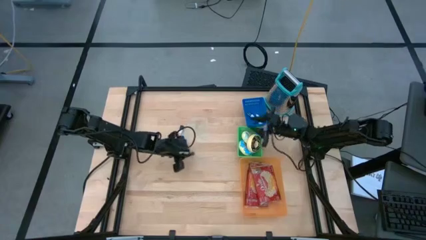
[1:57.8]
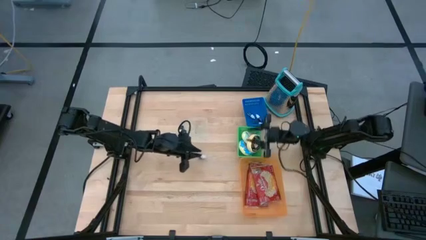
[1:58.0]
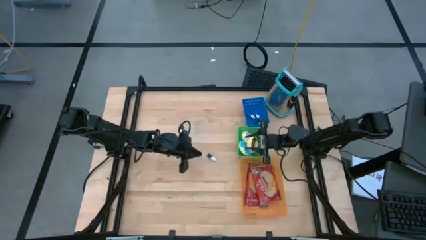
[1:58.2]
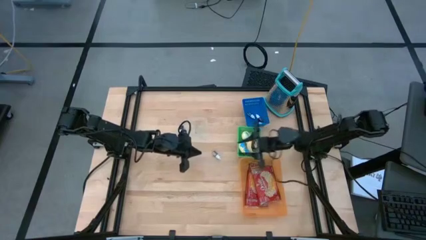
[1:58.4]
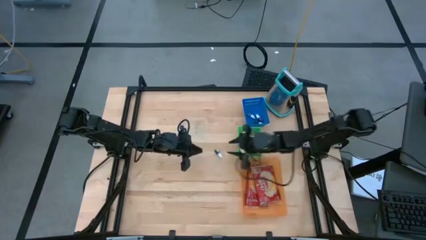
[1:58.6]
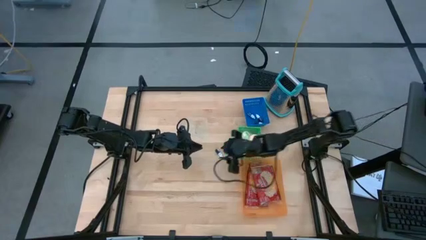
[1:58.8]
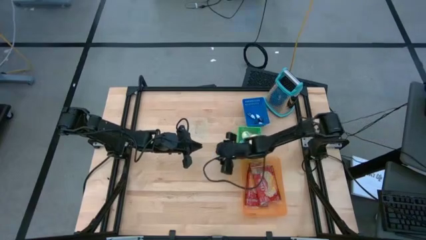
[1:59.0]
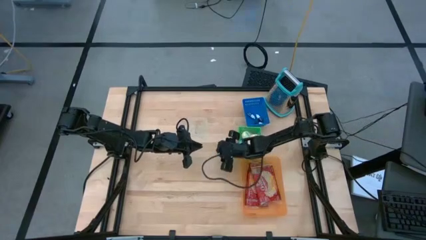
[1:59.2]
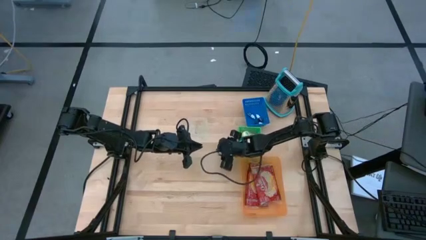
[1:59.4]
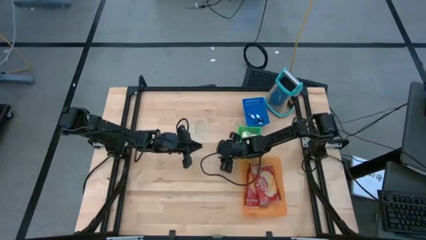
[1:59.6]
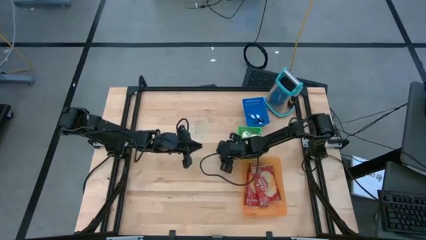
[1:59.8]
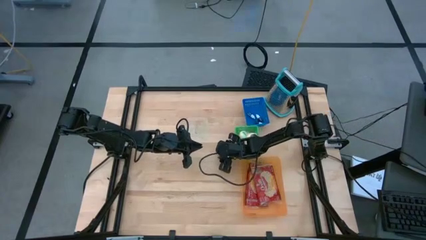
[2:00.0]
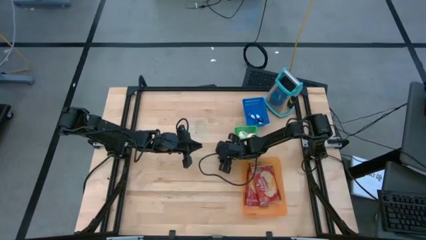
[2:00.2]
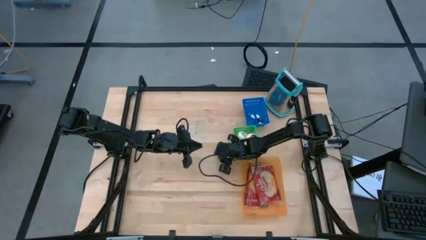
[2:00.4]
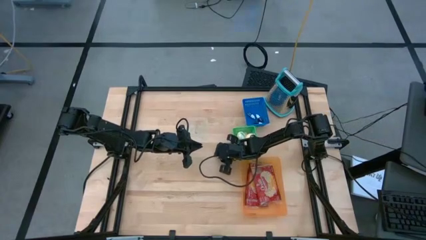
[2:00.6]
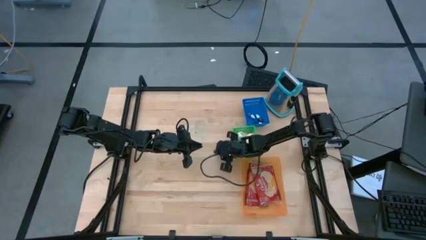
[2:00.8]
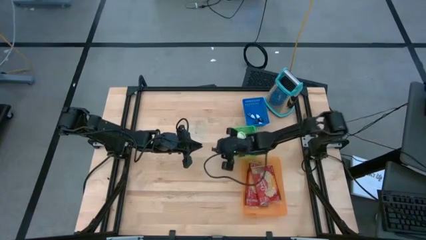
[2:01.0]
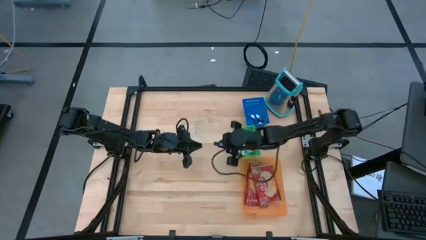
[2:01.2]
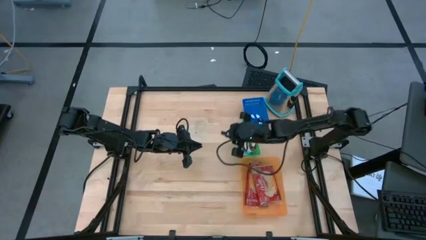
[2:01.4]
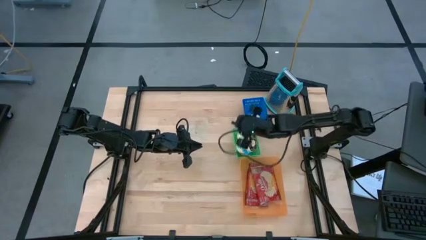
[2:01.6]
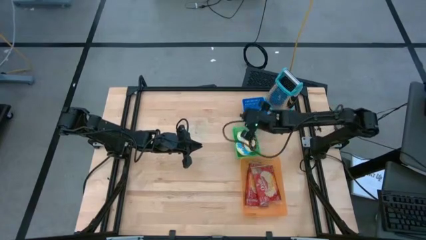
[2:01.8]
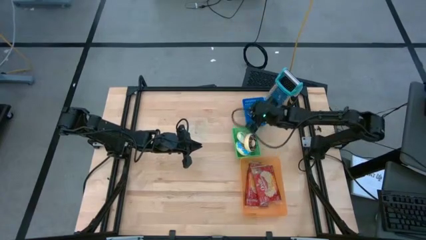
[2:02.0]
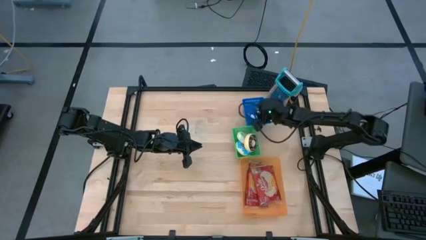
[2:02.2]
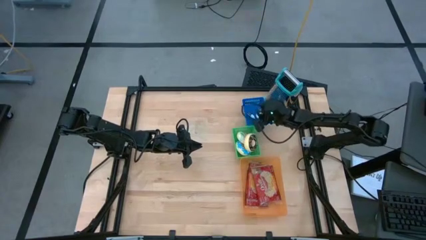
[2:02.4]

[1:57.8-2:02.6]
Put the brown food coloring bottle into the blue bin

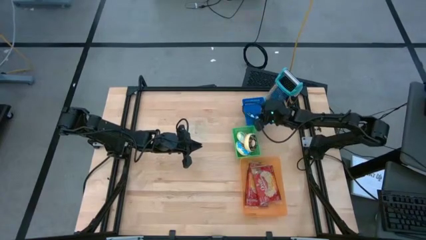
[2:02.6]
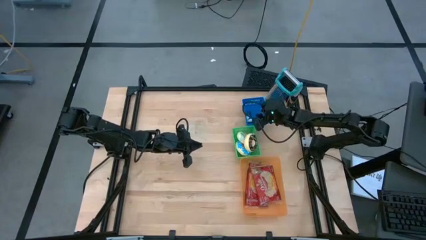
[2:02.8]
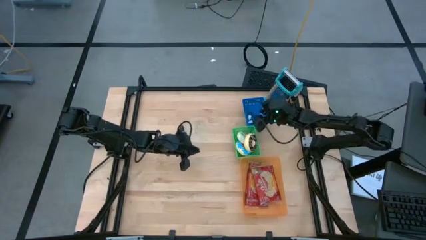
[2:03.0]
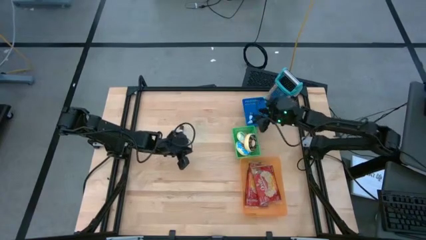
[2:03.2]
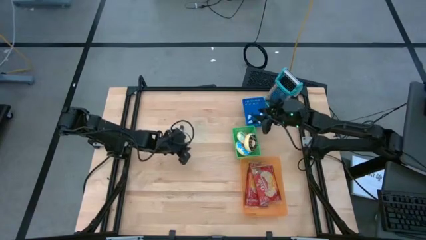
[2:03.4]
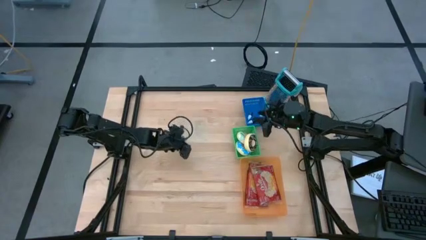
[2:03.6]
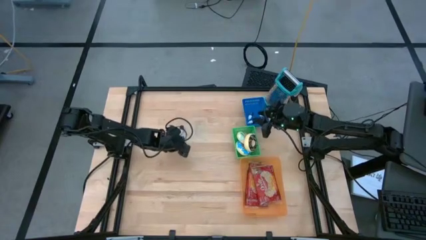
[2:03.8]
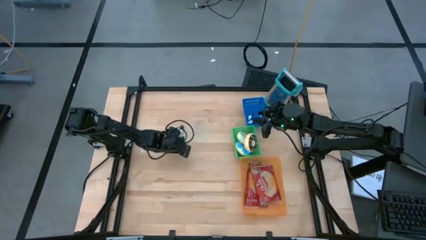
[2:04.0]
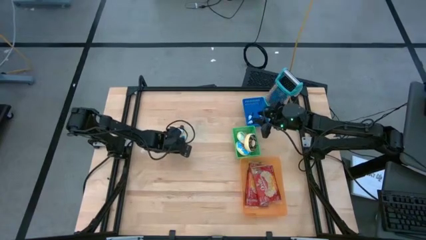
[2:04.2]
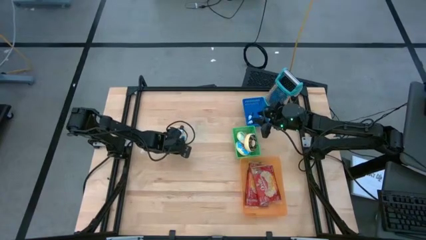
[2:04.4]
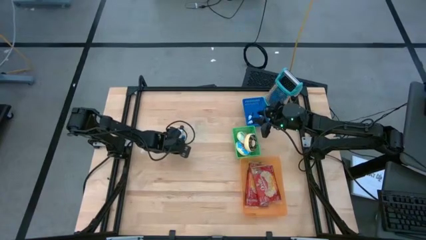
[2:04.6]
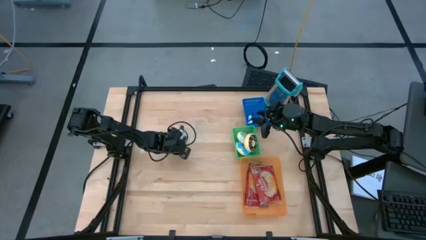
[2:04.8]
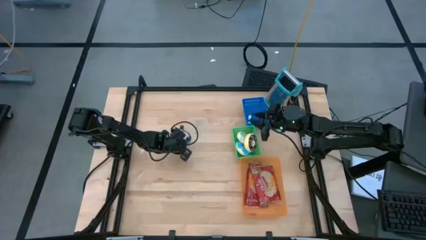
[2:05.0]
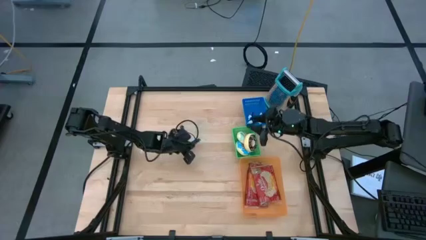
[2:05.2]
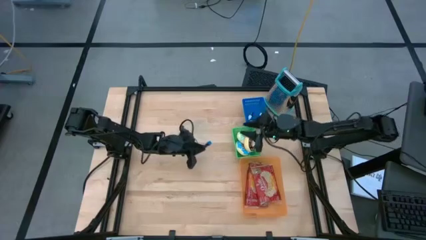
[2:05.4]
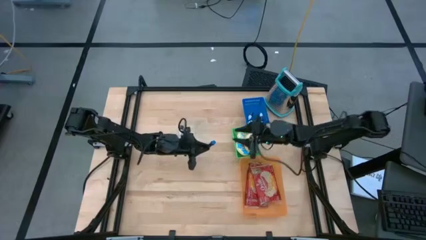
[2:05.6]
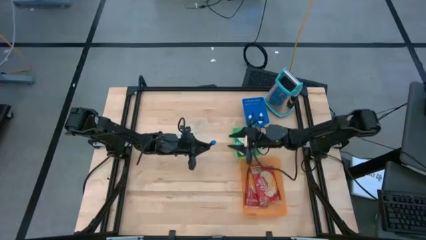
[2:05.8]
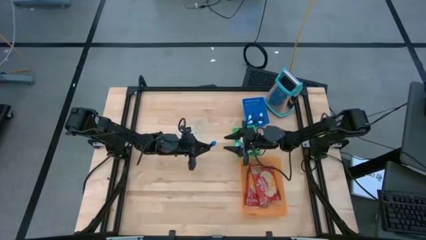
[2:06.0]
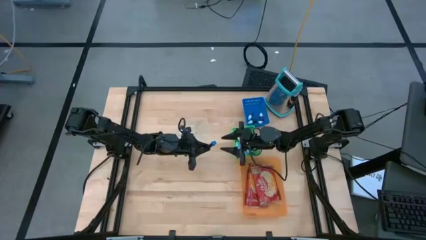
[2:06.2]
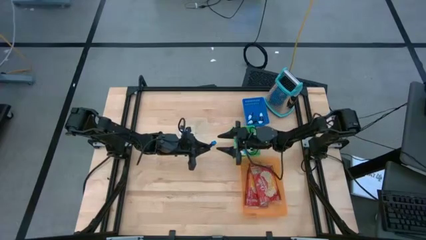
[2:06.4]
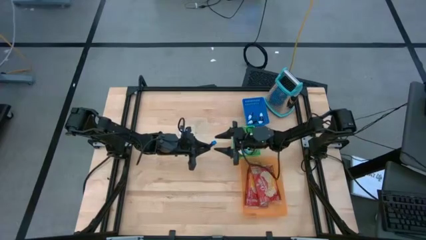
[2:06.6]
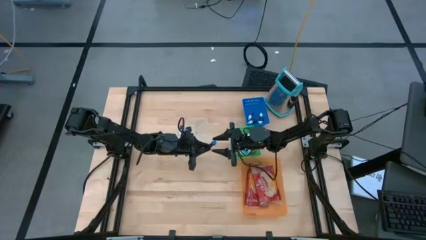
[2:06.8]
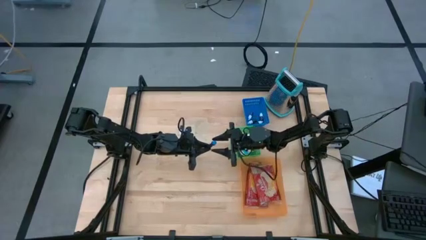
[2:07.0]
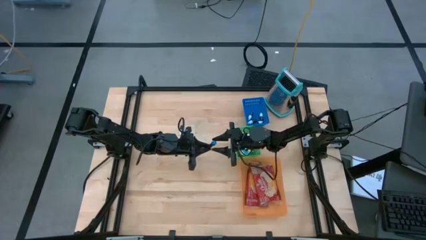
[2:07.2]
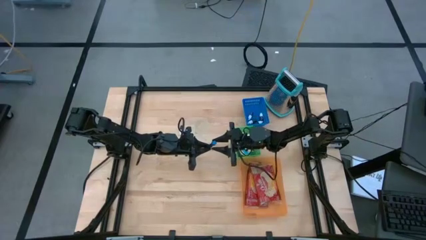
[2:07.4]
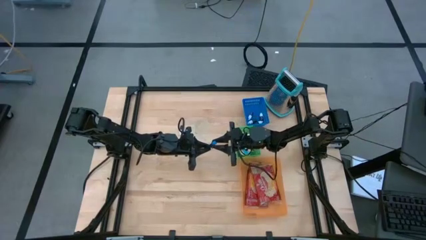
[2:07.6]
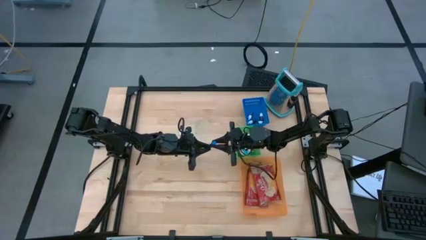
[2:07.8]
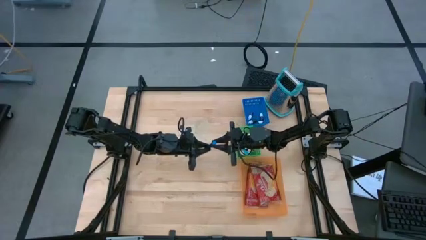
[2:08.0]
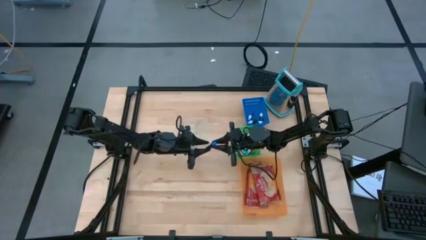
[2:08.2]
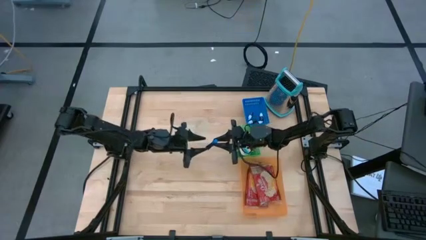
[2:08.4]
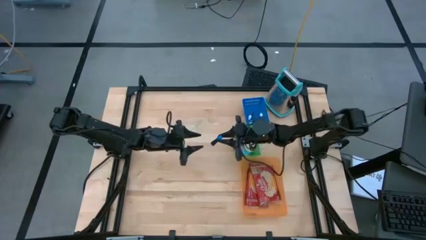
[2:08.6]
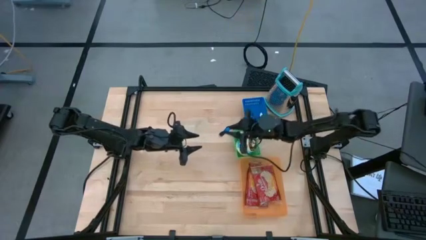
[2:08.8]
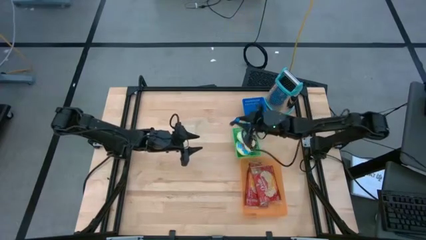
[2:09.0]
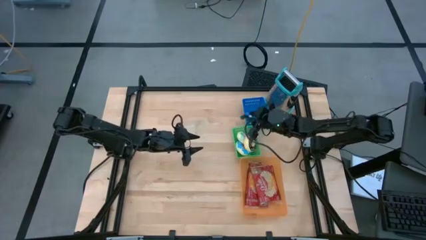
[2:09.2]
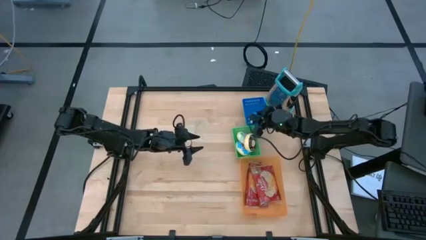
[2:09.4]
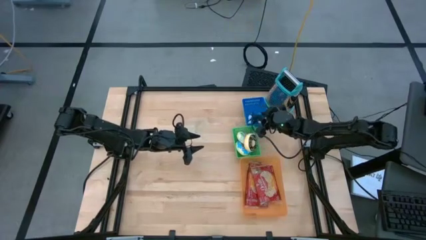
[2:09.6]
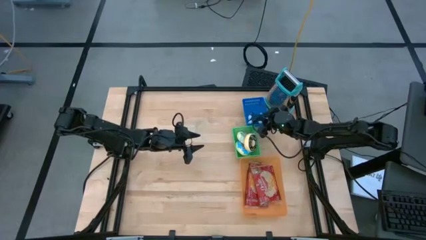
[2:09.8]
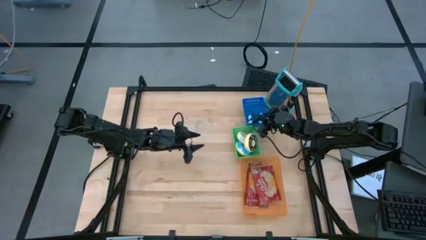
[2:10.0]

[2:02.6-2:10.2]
Put the blue food coloring bottle into the blue bin
